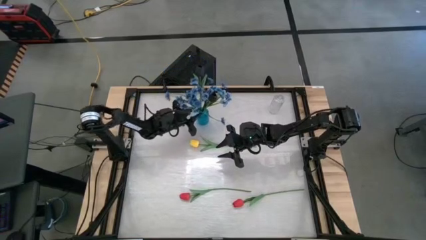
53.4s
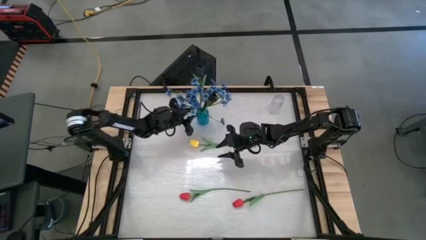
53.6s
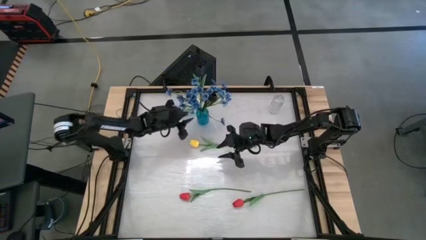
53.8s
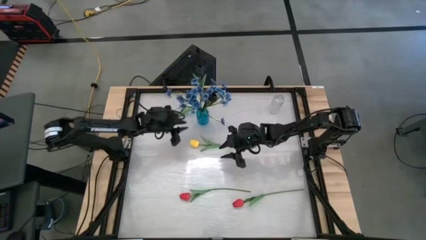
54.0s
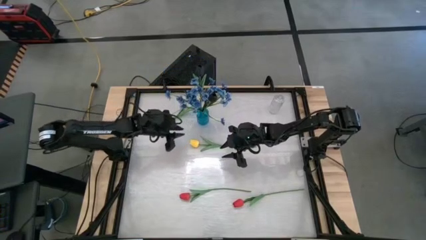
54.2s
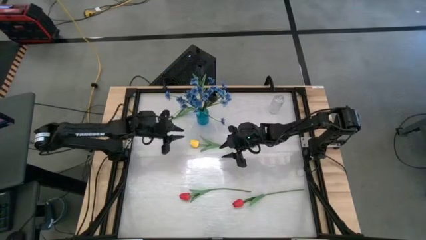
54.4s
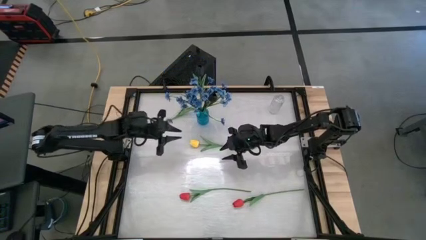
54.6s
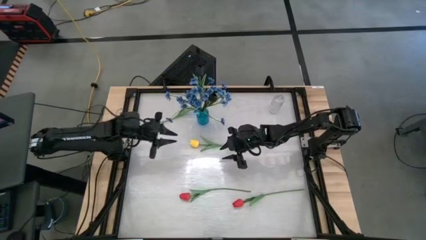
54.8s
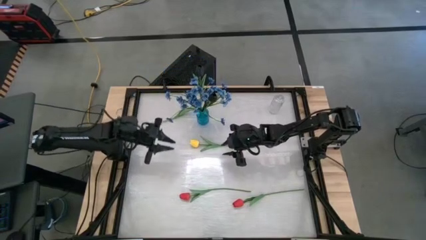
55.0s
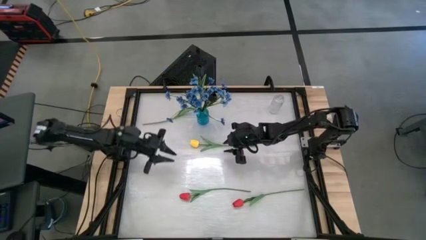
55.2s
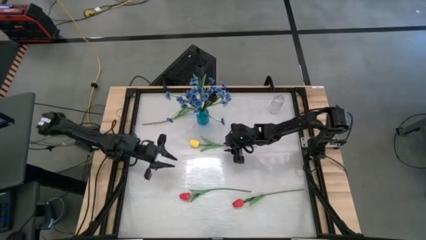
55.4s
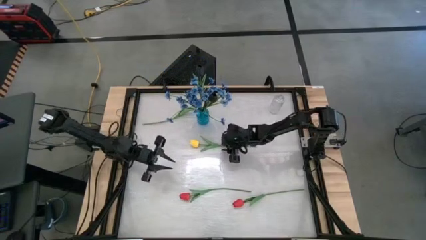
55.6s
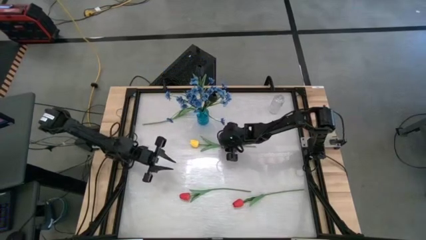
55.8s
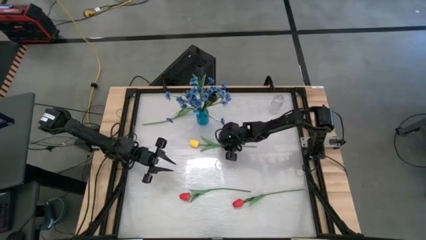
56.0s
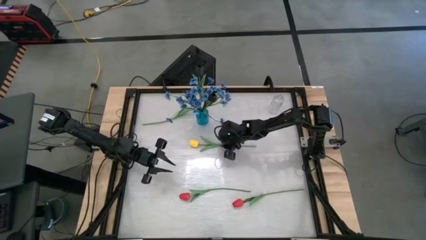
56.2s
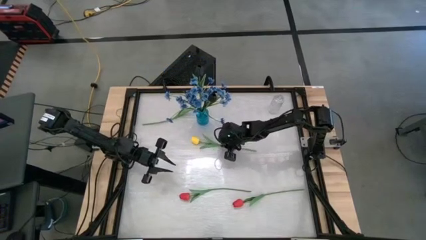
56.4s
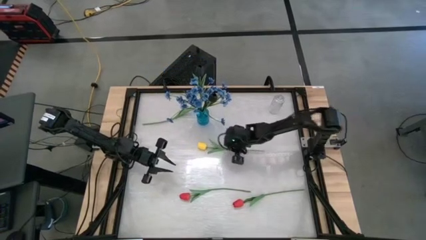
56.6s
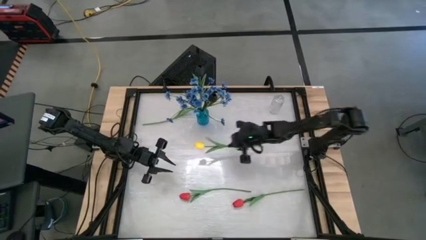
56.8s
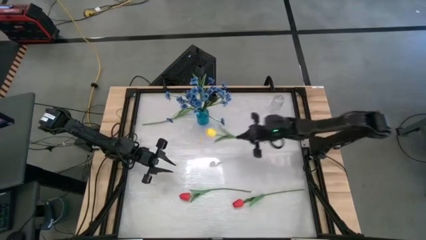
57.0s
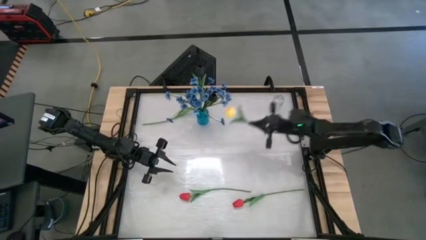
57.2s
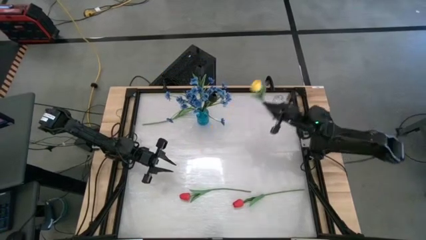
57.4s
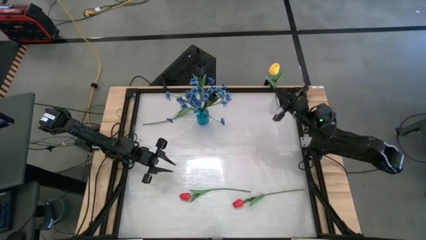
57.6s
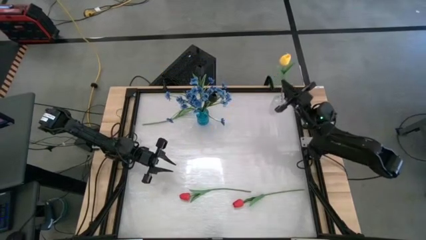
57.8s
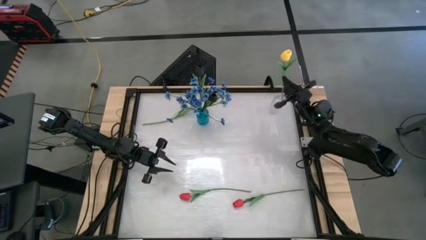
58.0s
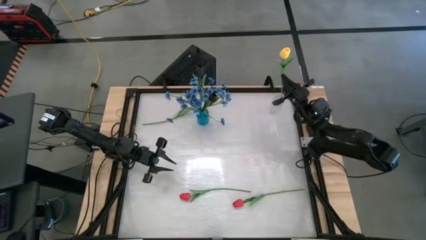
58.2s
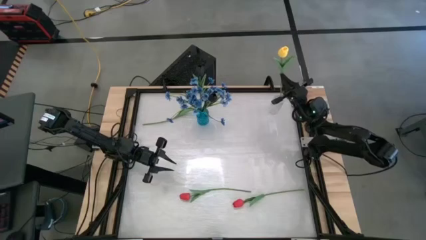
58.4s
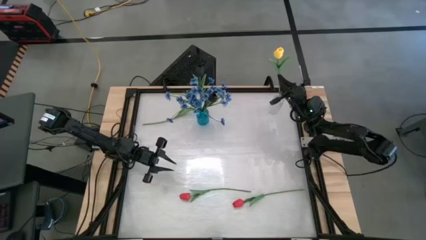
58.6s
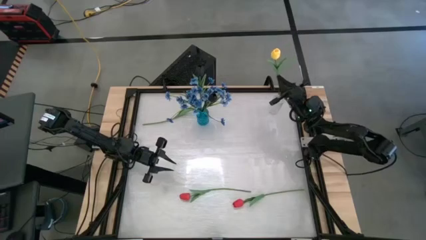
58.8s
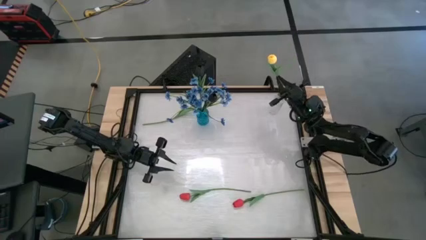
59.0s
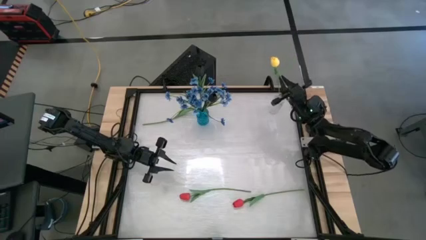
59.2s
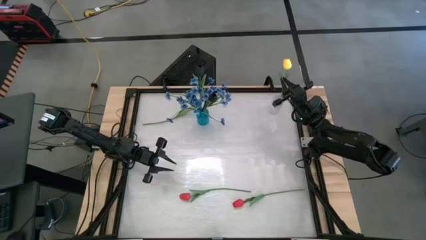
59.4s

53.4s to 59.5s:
Task: Sort flowers into vase by color
Put the bottom yellow flower into the transparent vase

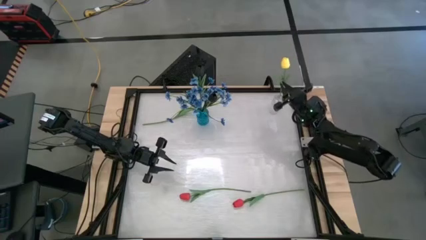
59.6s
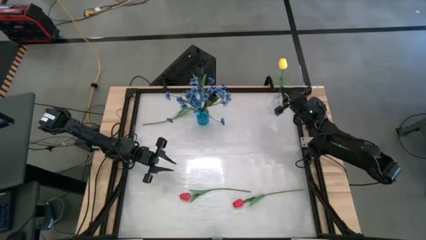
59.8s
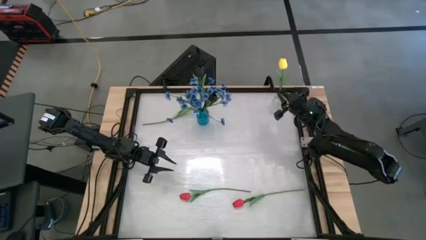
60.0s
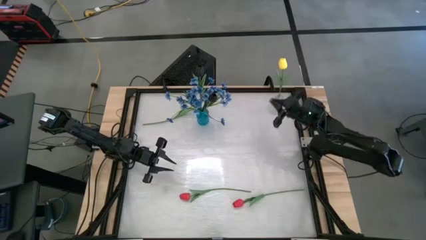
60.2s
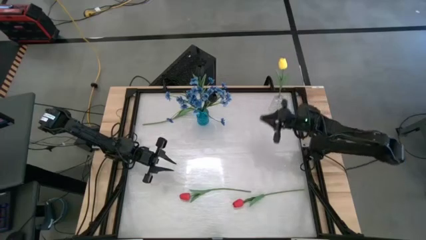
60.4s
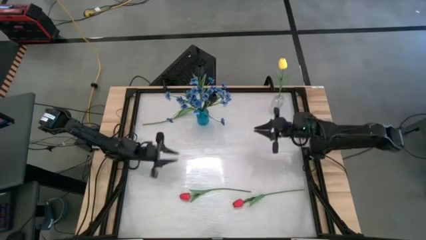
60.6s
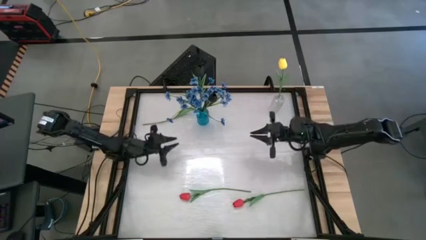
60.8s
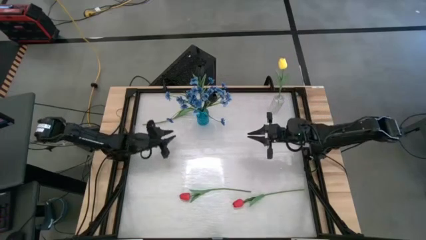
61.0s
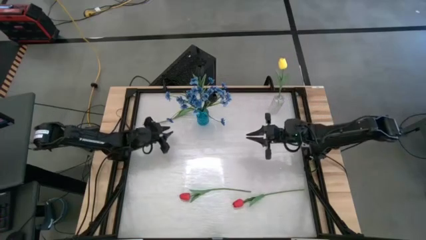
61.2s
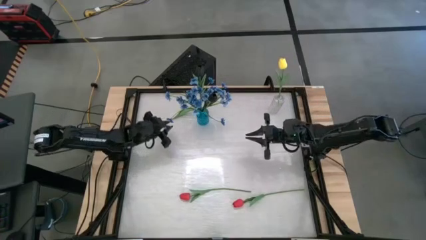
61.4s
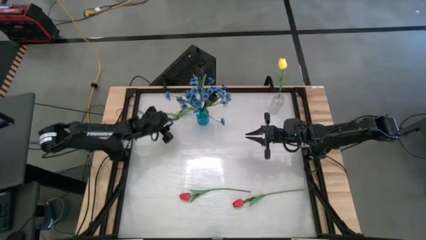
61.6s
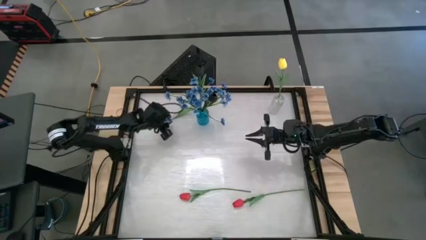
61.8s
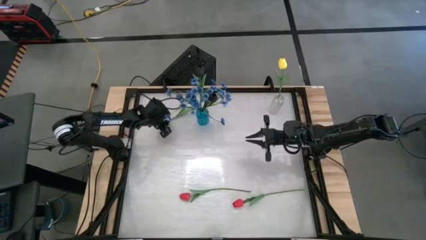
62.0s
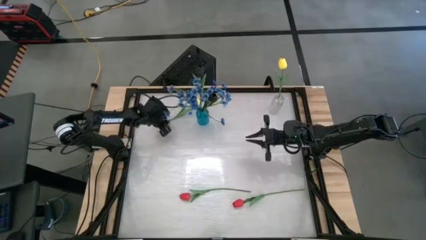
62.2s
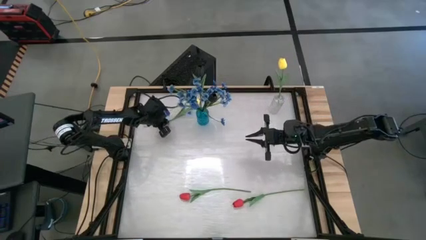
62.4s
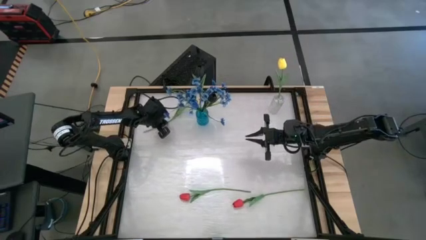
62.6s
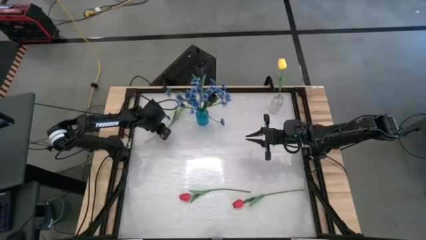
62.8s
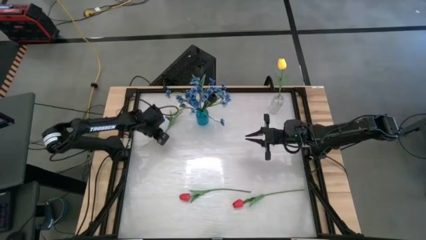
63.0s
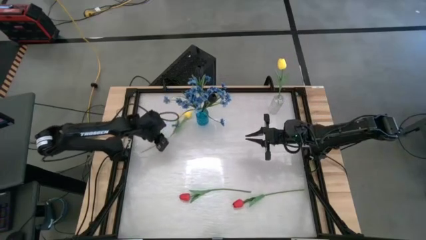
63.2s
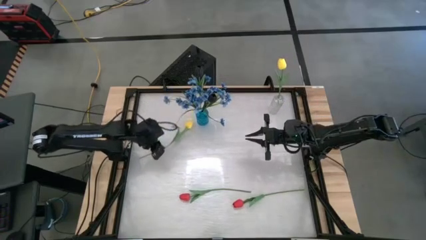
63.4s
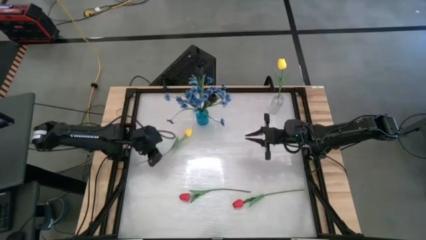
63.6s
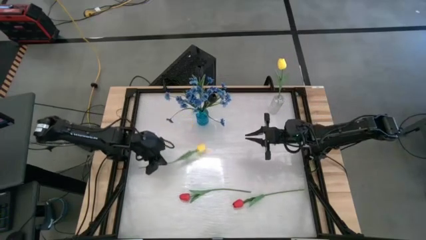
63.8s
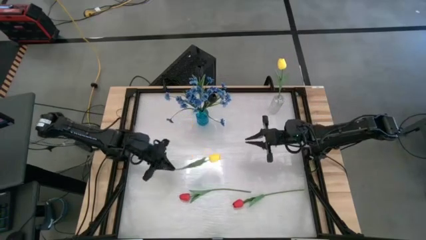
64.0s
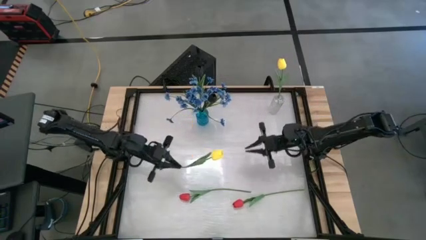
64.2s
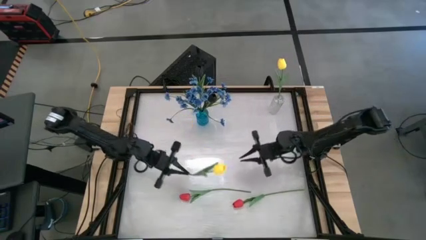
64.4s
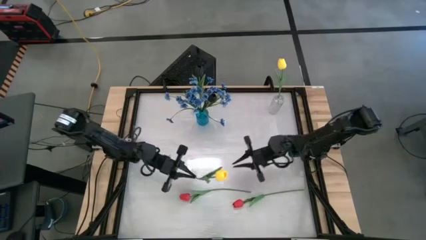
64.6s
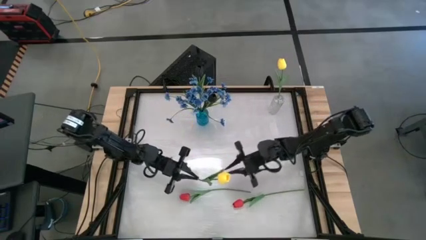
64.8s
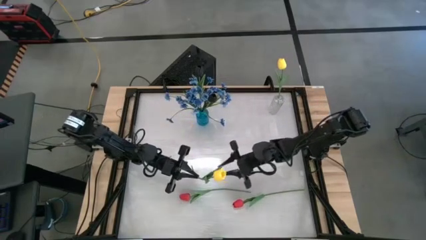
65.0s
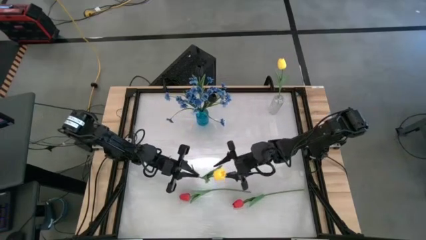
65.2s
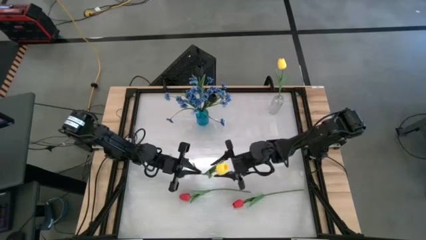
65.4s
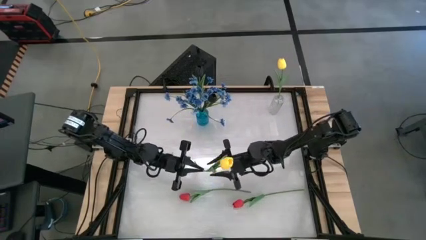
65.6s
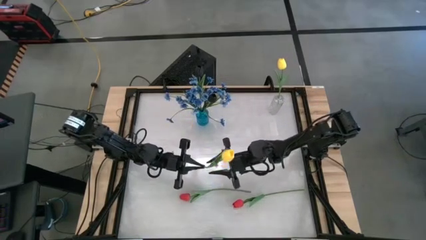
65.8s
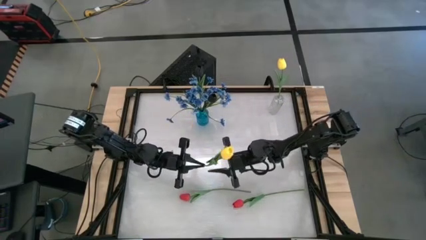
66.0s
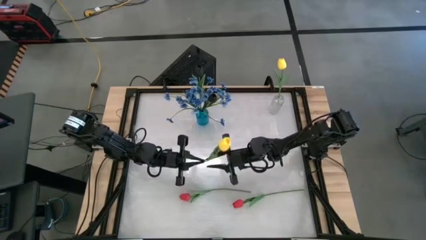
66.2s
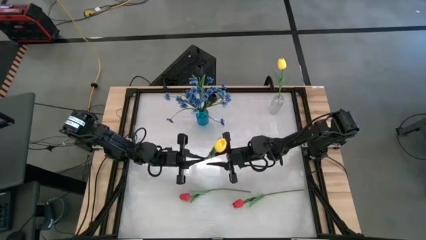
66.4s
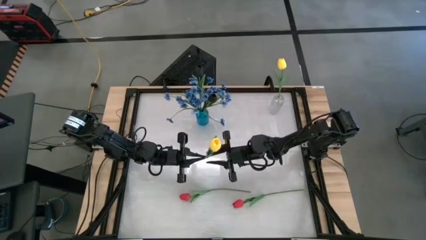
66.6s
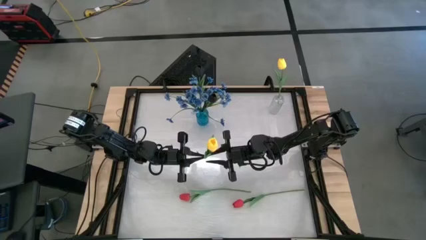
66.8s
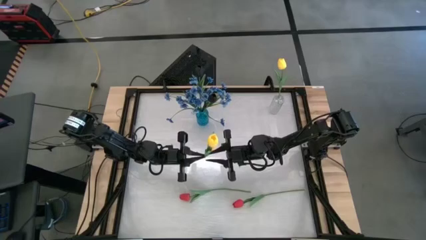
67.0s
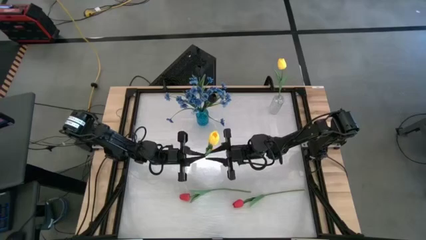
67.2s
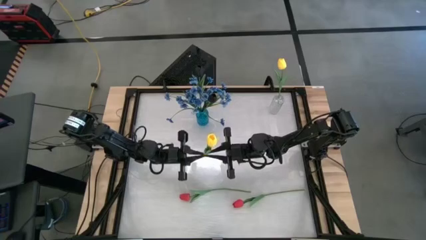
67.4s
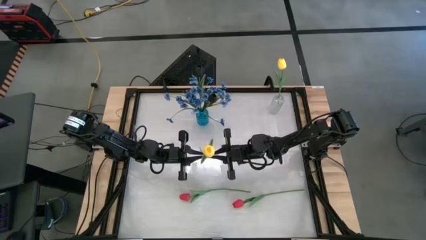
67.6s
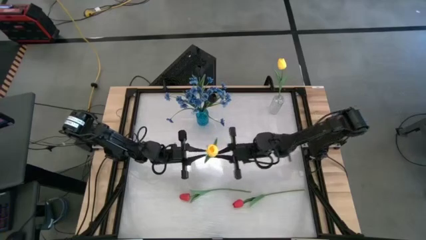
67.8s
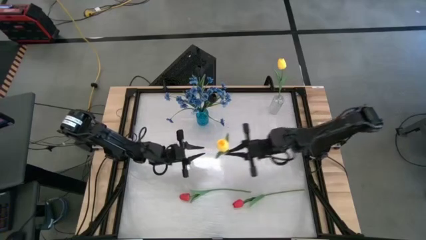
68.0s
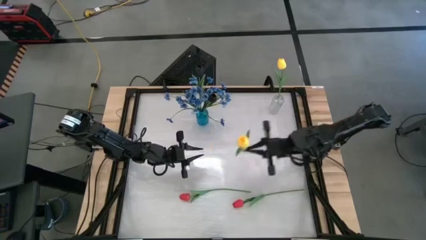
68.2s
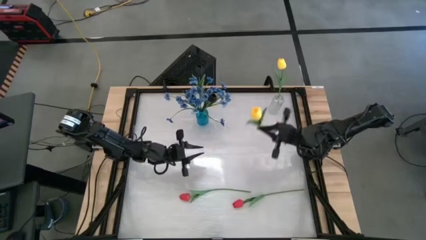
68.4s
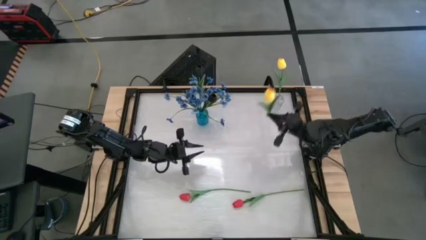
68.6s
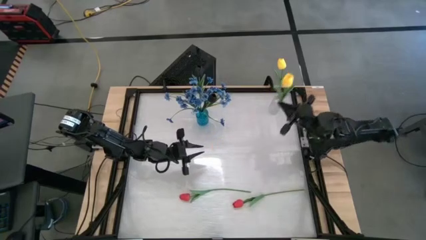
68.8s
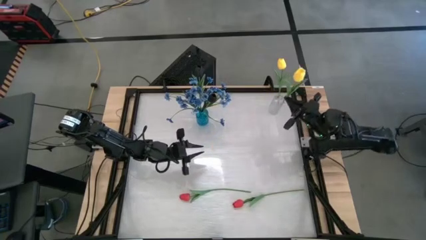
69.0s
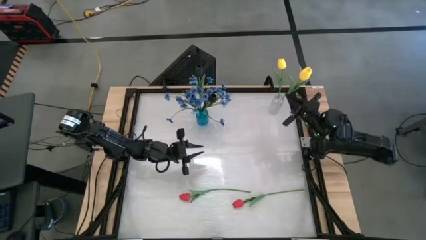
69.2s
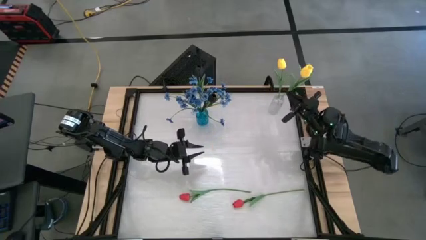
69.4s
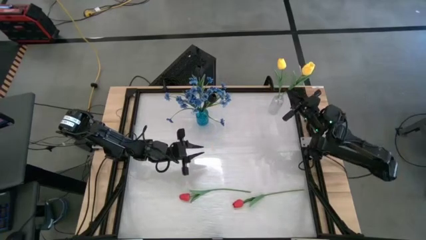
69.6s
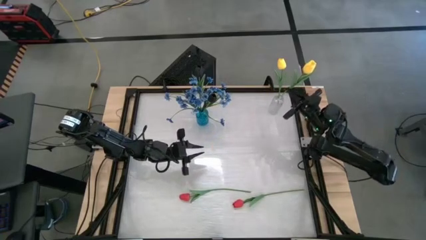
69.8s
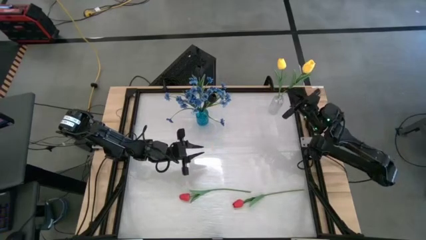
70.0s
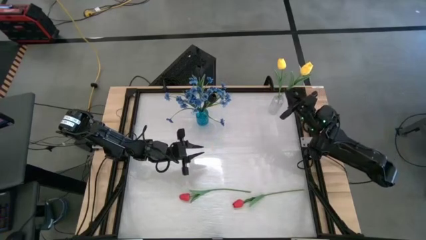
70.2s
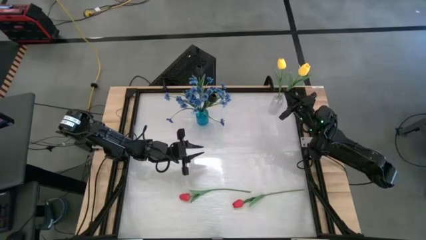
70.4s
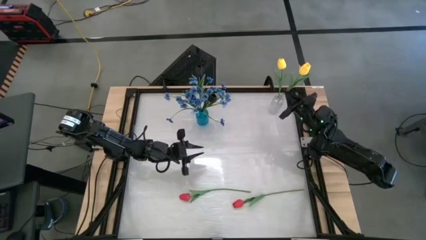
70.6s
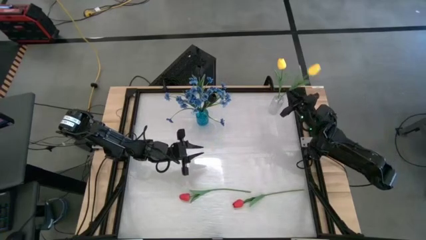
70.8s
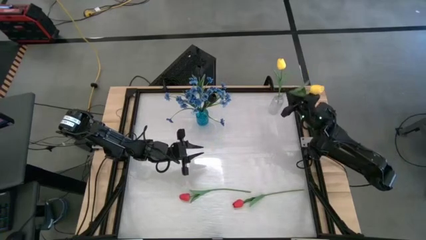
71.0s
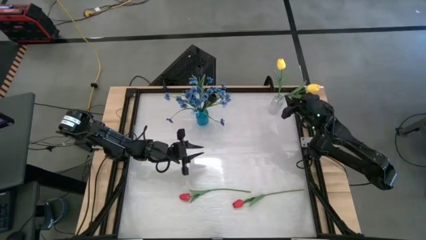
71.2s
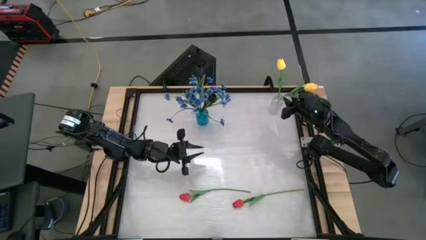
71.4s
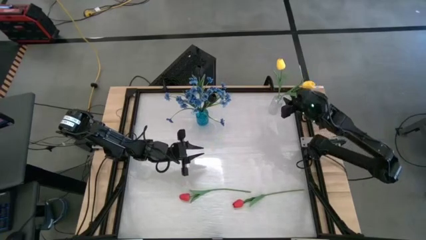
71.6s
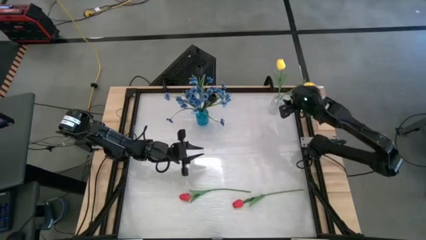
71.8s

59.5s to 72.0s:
Put the yellow flower into the transparent vase
